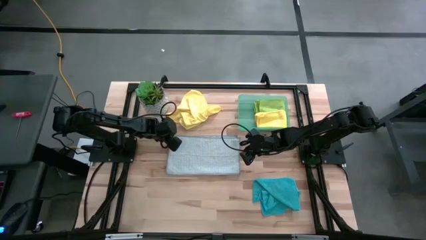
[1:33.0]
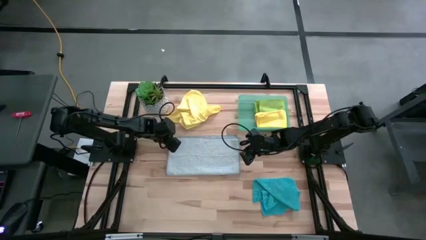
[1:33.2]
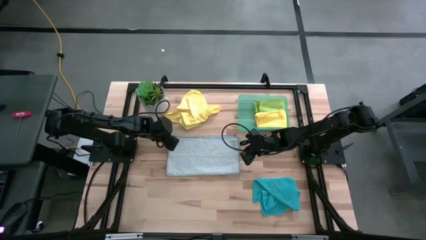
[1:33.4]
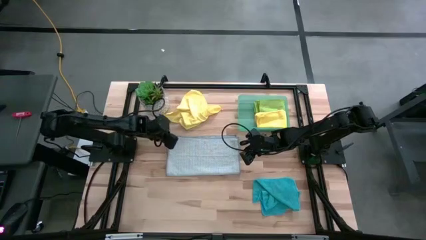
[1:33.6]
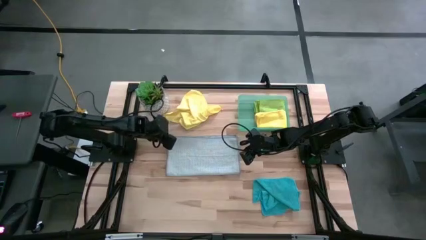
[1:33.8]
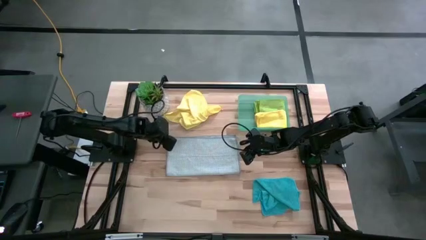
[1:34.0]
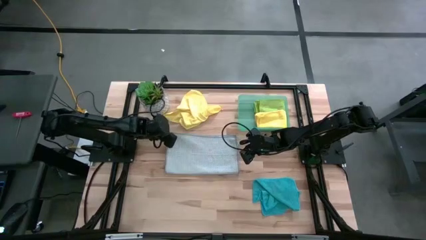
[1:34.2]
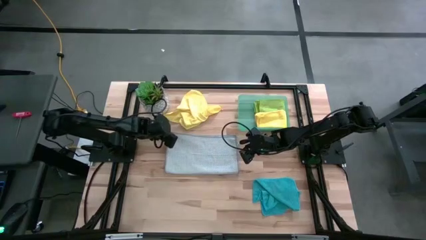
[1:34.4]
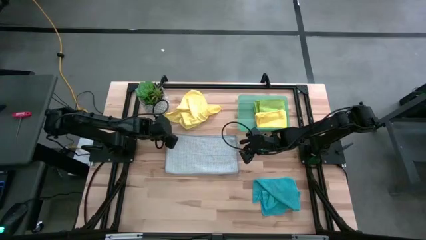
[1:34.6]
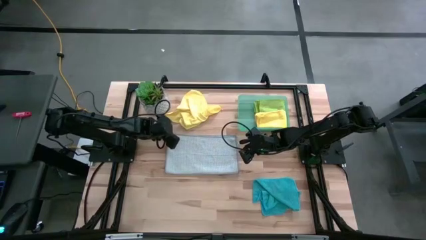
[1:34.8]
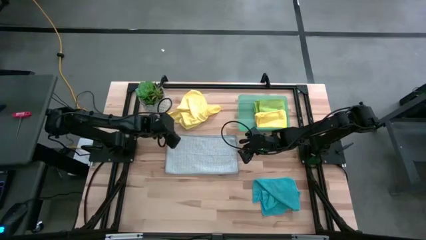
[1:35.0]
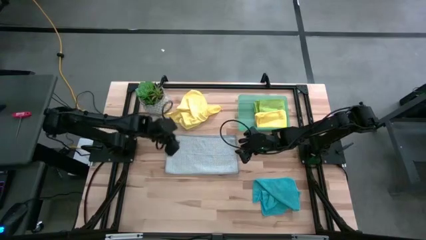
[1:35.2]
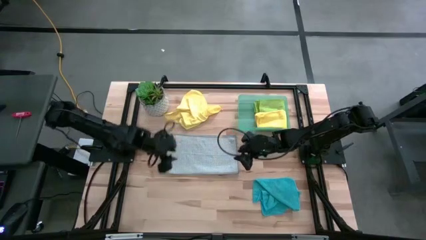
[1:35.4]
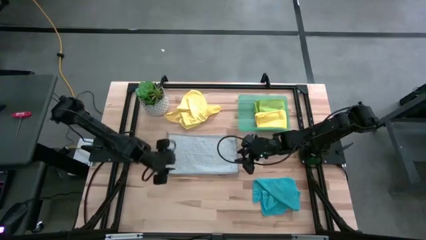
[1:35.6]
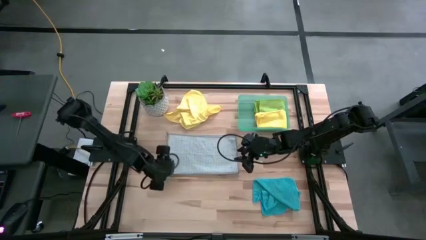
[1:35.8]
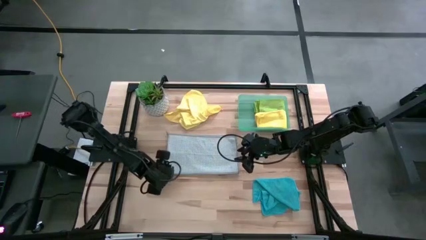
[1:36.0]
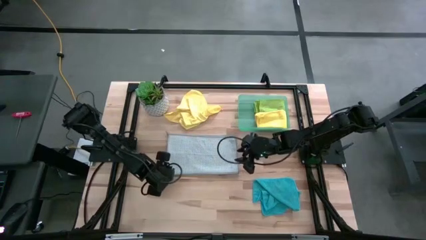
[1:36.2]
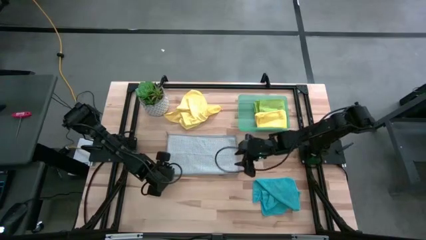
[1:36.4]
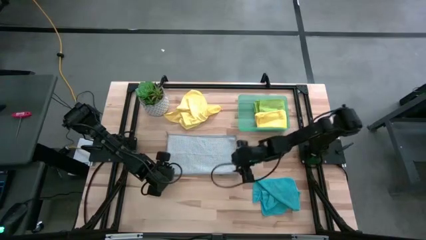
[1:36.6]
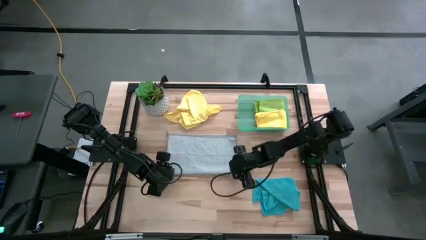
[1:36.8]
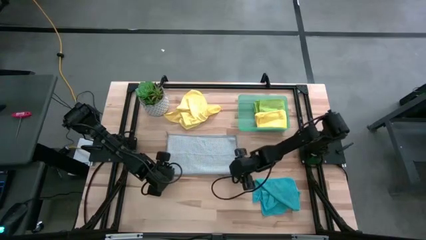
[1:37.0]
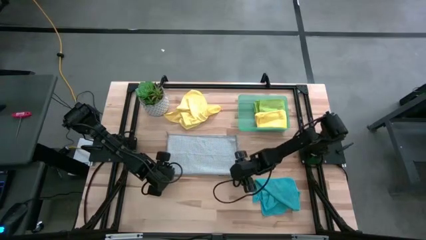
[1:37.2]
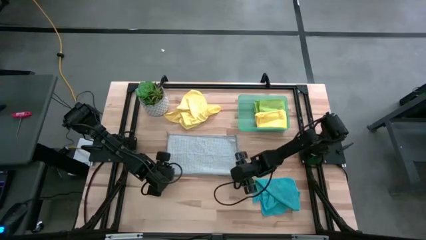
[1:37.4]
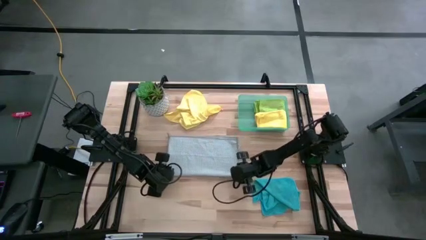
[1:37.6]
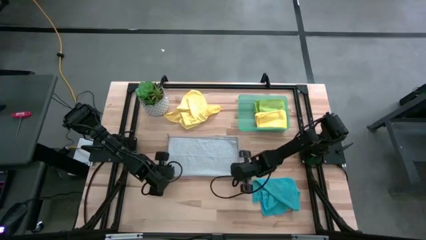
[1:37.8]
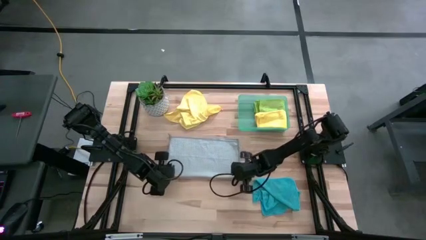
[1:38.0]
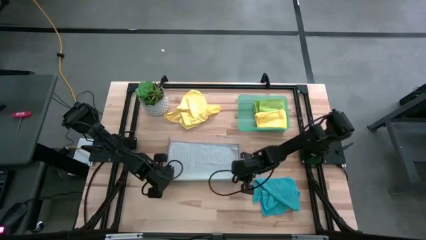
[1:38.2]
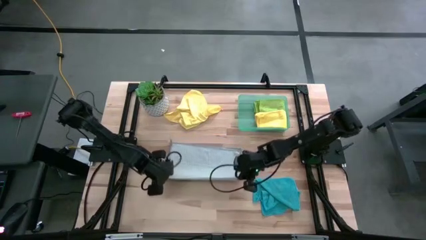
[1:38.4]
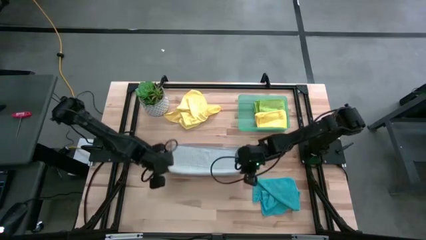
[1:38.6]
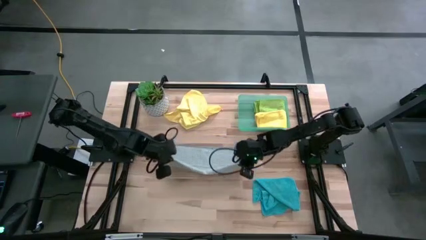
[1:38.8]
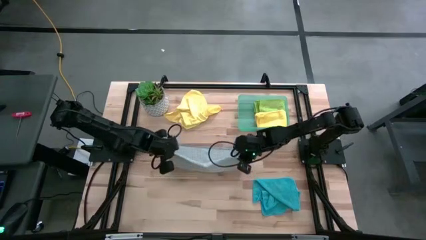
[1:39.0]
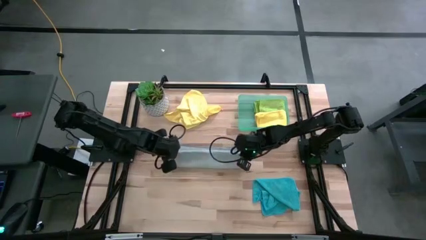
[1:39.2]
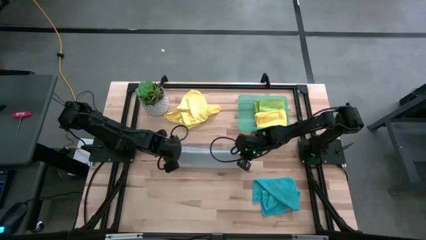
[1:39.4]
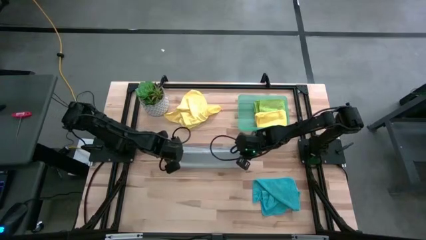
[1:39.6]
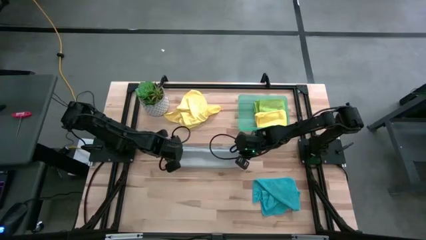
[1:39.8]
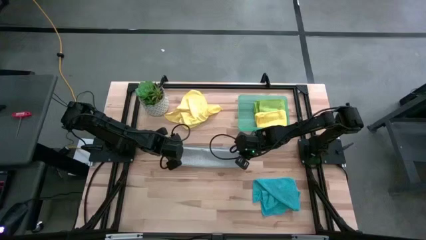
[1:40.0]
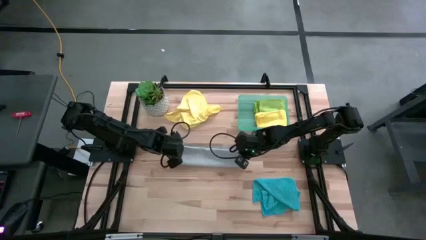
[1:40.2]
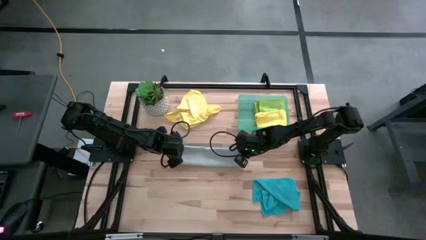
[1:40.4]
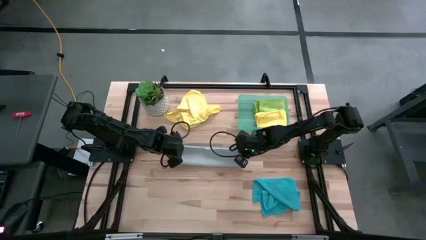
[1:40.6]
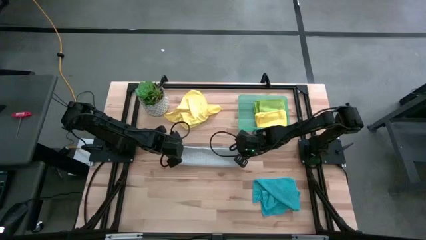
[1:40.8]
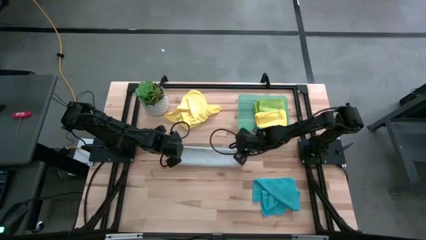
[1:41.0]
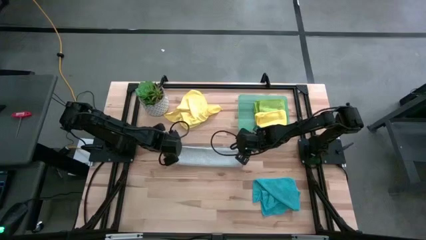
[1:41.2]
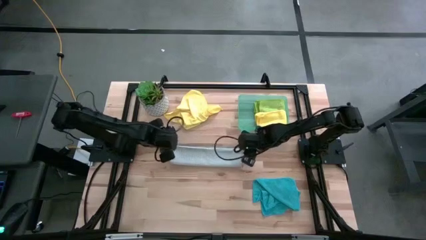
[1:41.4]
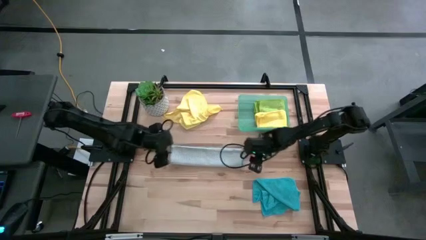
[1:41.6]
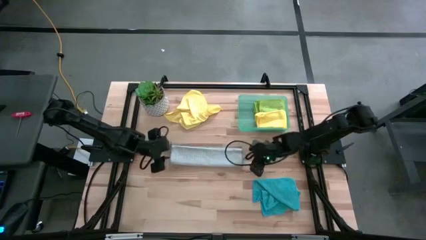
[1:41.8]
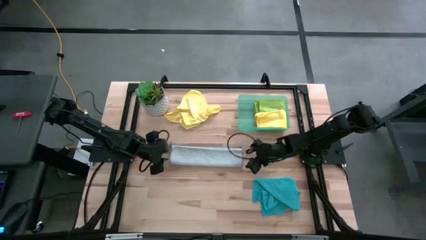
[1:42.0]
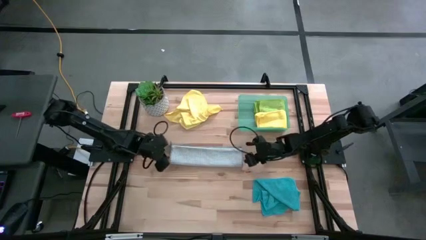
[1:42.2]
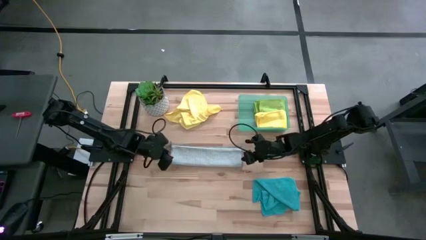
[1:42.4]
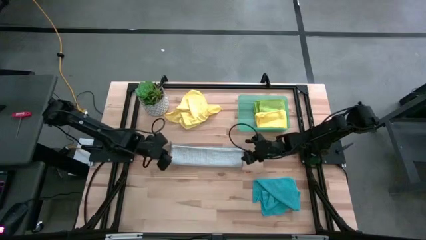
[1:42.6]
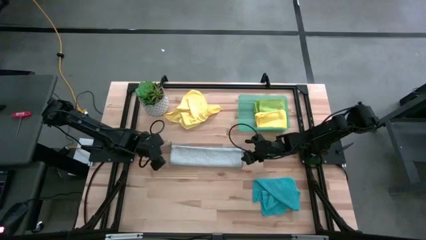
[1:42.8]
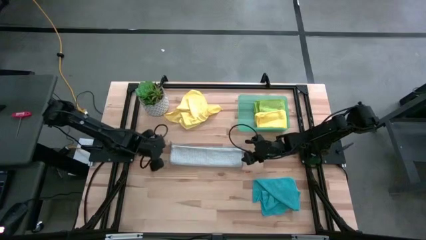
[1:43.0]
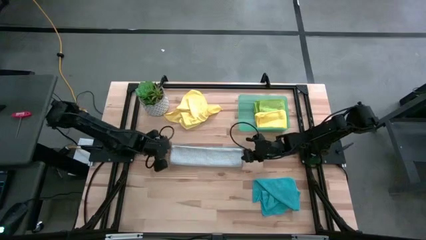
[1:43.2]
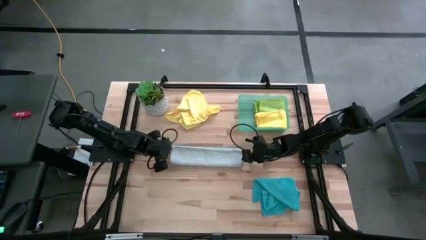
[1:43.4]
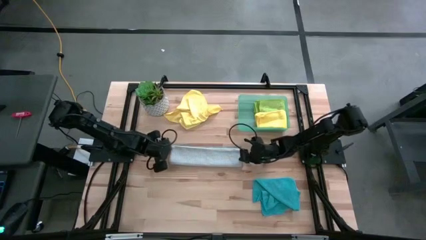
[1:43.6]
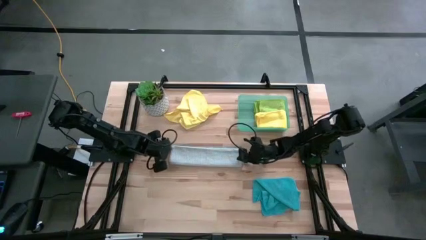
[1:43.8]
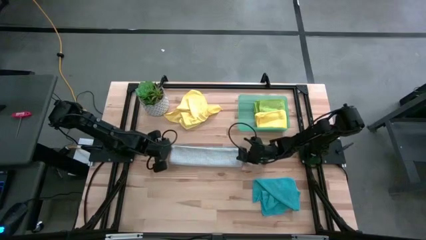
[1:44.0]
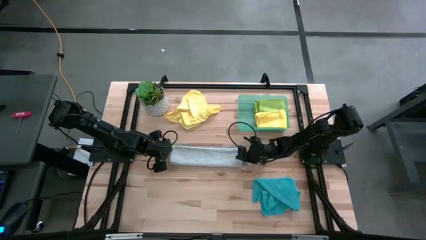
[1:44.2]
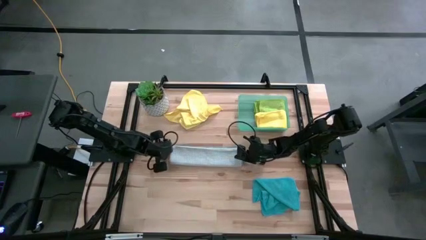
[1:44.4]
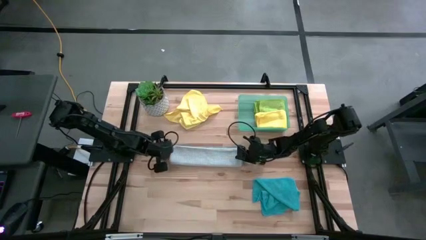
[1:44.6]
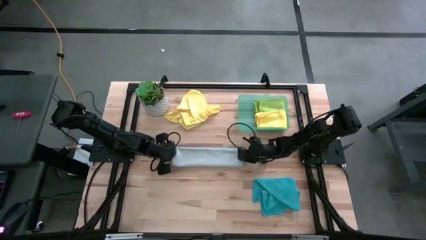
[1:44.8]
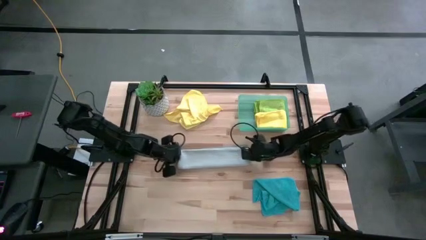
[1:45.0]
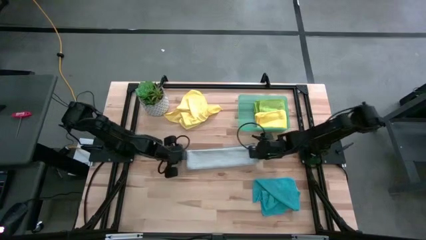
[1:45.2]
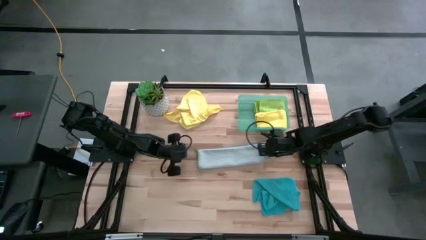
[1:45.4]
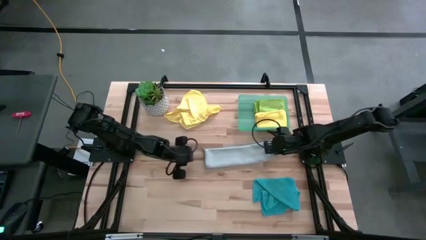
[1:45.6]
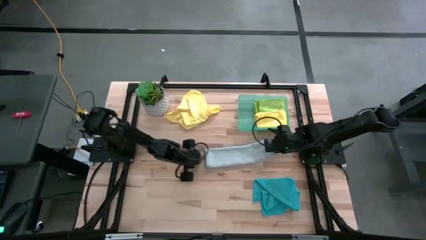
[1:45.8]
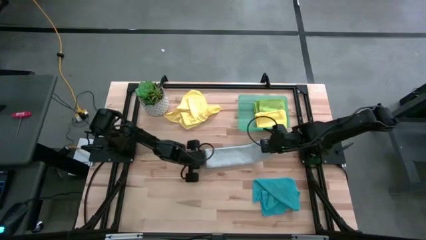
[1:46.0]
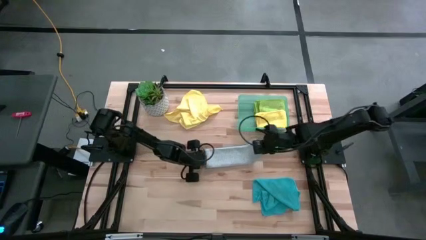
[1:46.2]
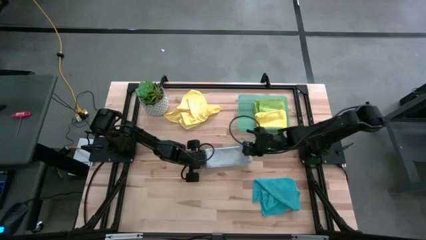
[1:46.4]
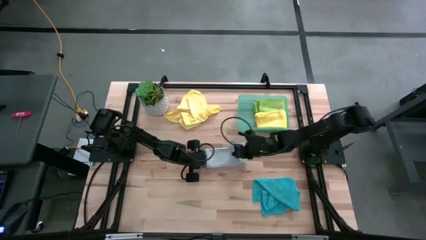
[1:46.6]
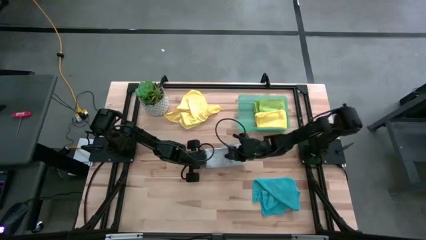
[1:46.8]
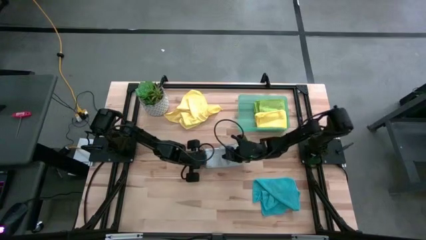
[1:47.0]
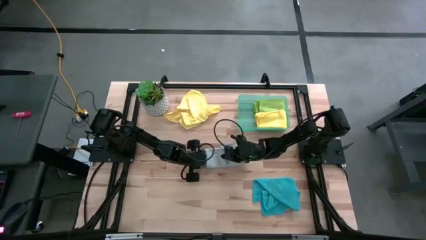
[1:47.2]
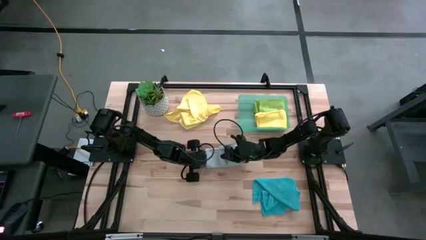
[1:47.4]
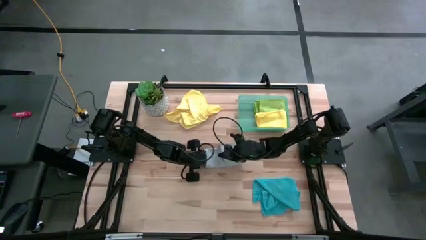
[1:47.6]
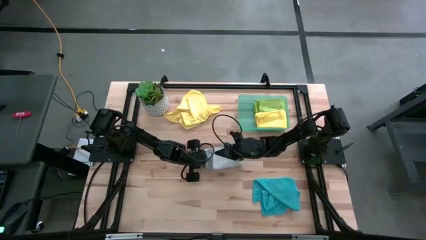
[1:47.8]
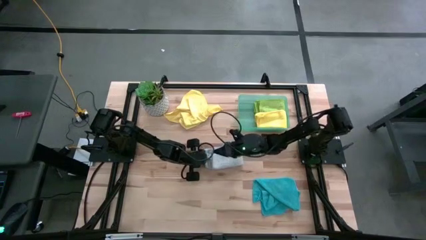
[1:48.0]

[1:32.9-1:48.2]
Task: Fold microfiber towels
Fold the gray towel
